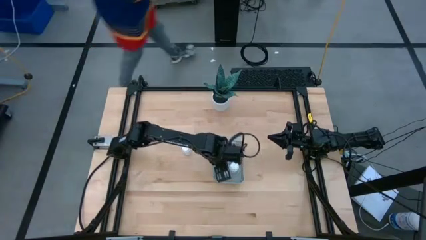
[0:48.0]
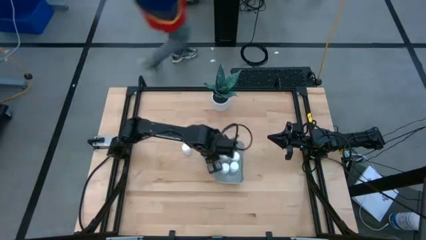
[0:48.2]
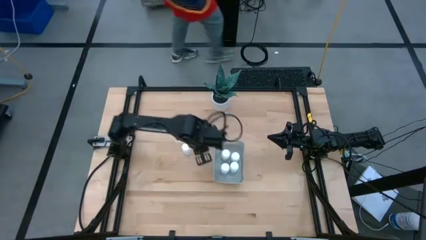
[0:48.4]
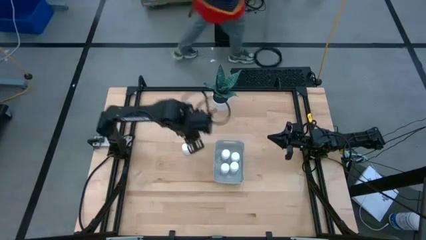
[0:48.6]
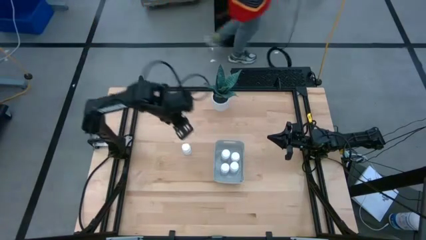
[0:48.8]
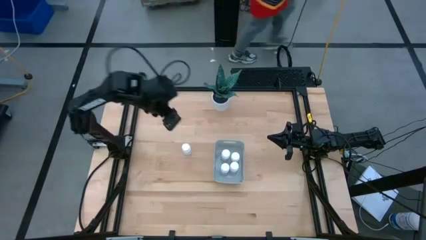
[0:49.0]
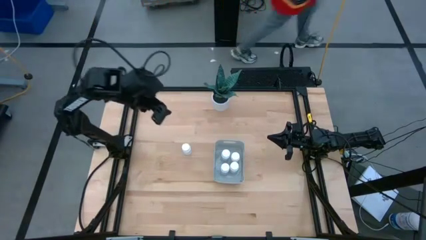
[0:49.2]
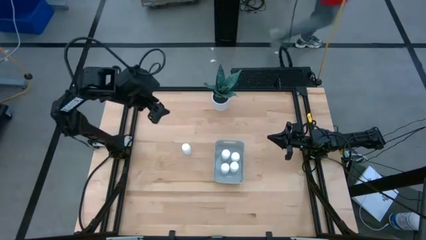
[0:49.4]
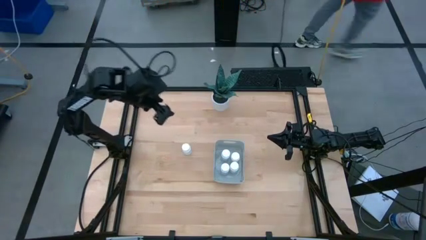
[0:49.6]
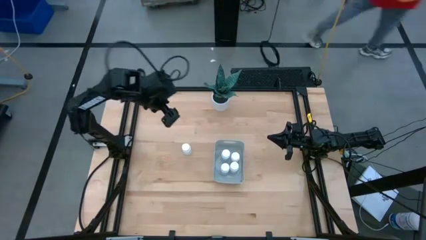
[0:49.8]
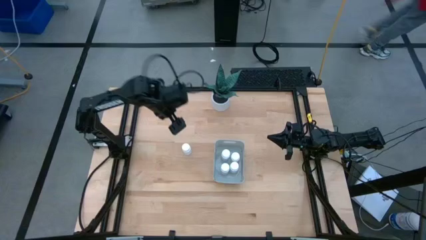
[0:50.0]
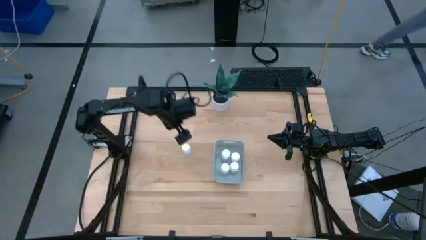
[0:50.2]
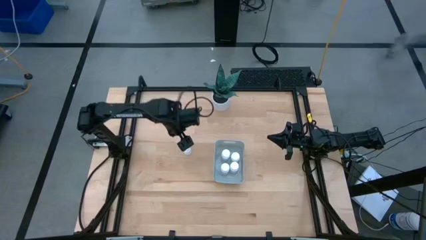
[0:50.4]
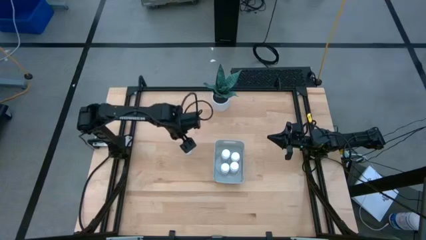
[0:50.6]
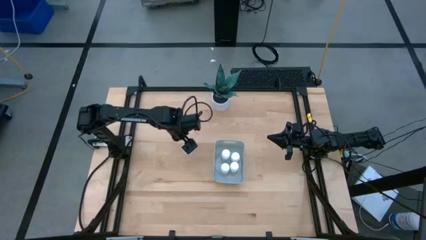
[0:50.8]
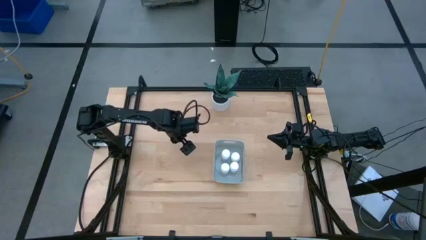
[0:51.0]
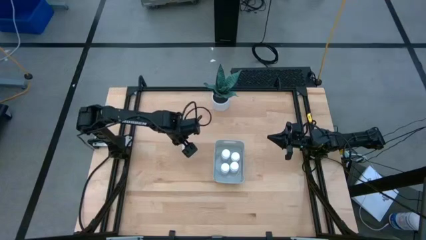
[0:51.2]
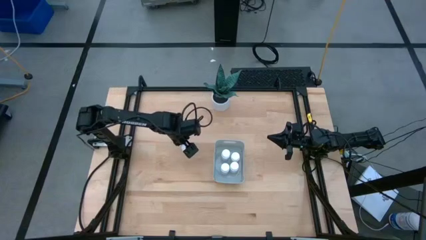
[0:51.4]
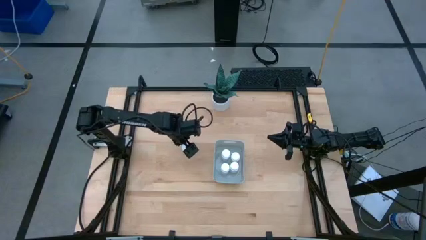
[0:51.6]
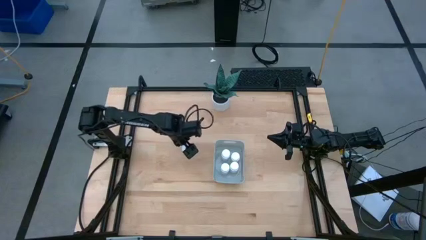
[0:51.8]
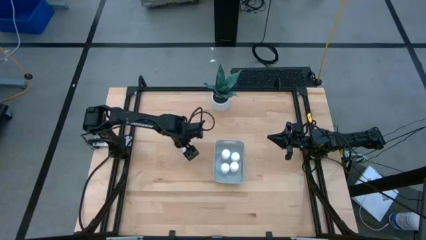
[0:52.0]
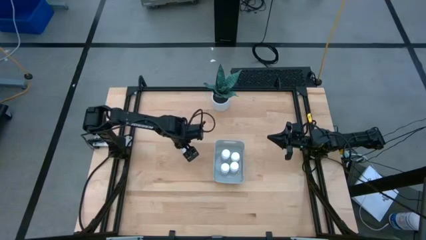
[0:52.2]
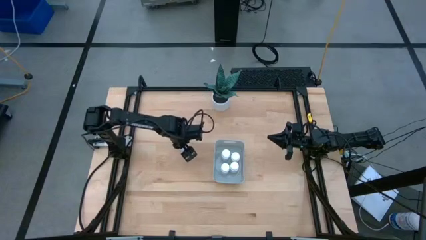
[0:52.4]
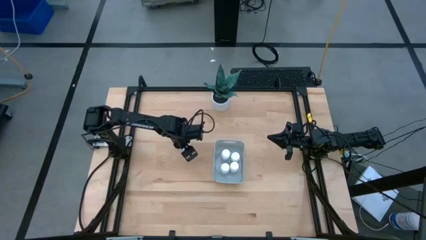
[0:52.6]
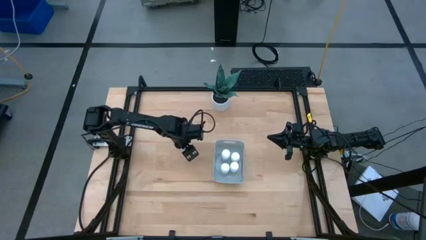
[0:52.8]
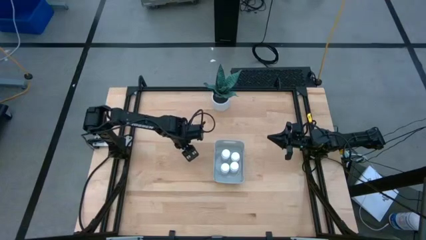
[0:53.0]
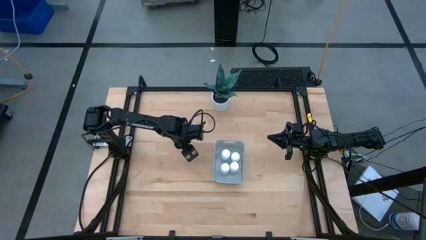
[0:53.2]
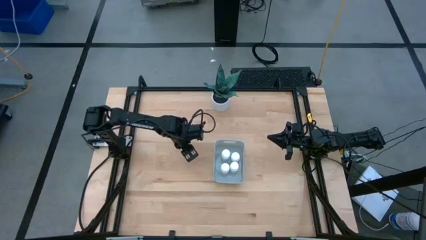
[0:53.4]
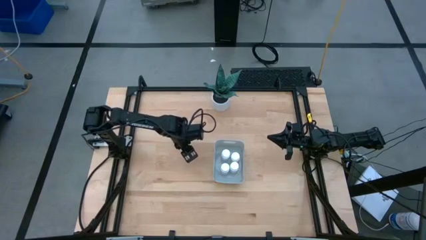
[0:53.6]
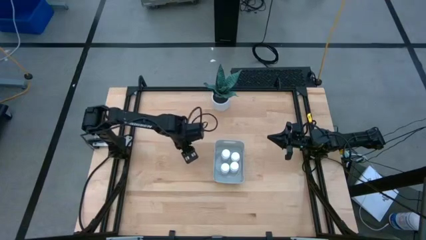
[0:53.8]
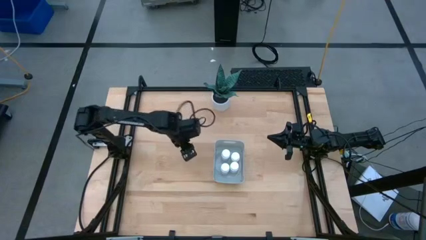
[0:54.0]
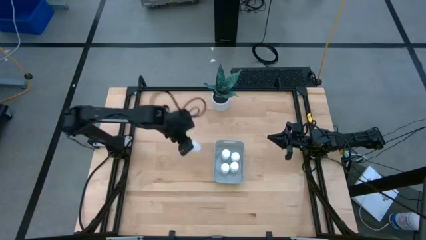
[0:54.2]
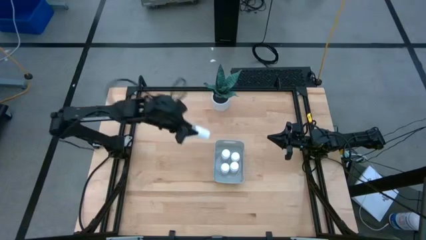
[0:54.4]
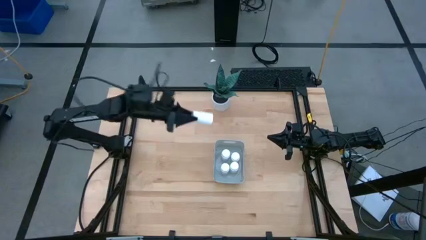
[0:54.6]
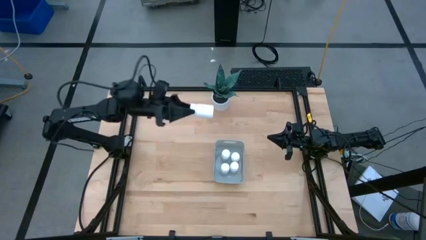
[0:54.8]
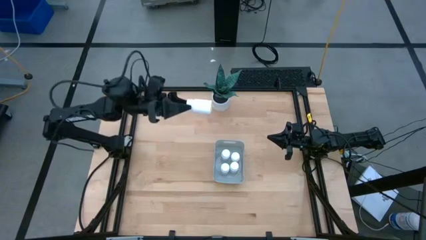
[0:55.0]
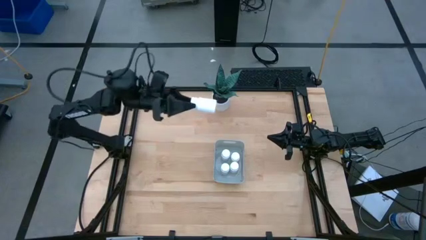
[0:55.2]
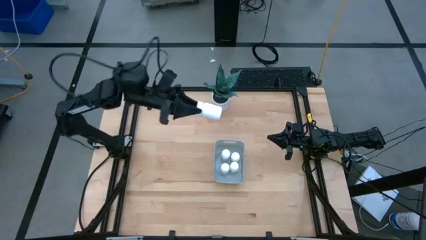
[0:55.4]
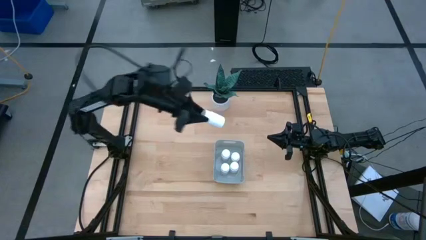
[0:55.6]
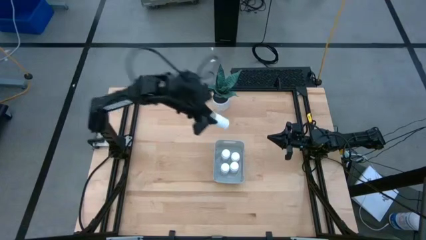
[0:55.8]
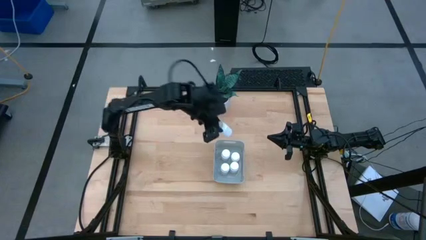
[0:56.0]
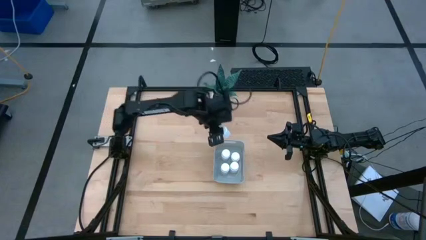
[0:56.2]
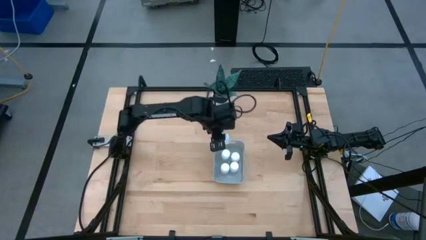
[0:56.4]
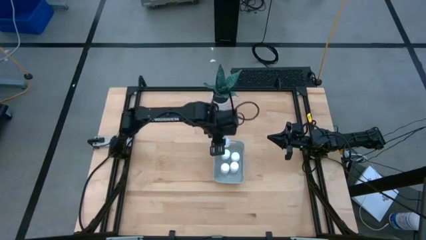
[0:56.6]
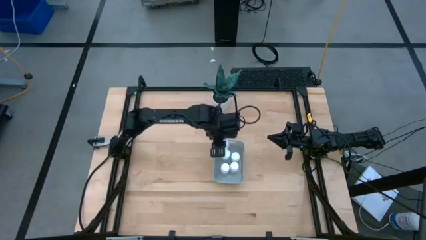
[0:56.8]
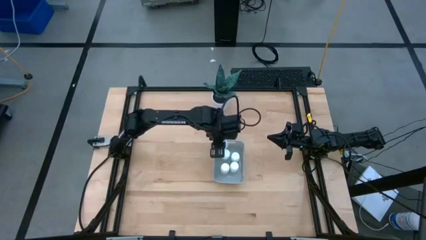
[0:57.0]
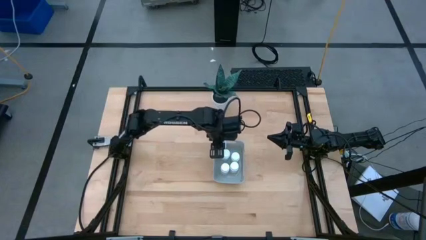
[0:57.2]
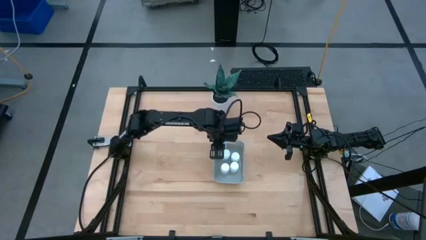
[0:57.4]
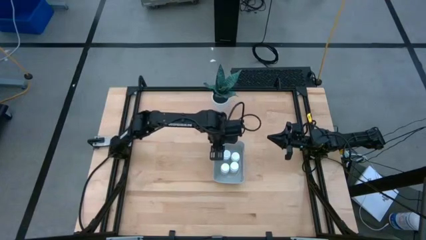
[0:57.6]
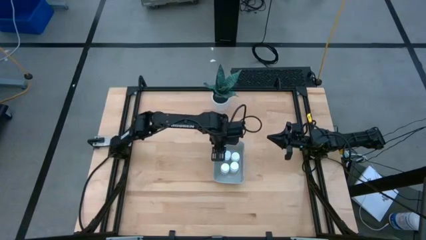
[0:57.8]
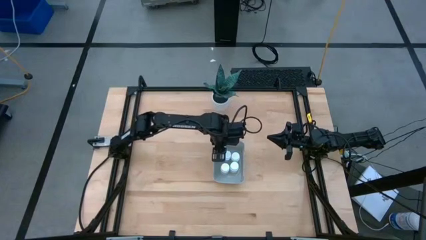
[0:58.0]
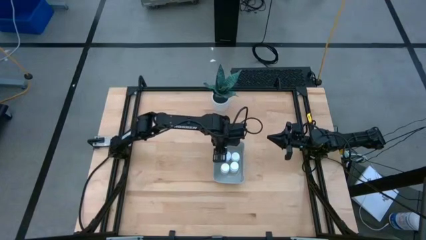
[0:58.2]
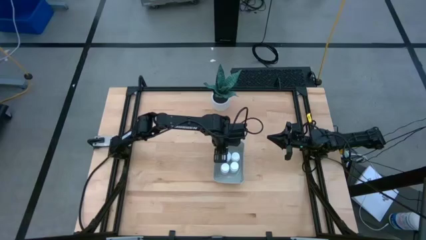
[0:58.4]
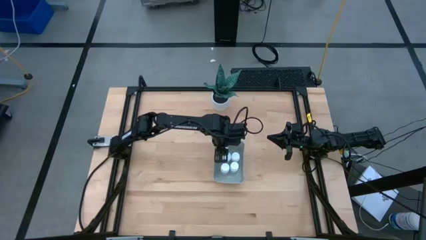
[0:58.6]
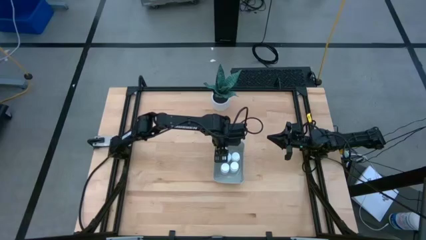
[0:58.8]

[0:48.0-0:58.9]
Task: Pick and place pill bottles into a basket
Put the white pill bottle into the gray bin

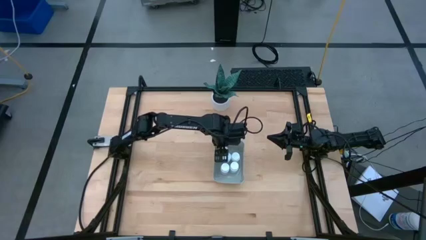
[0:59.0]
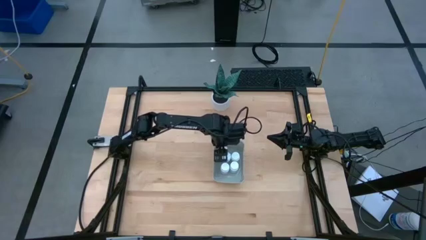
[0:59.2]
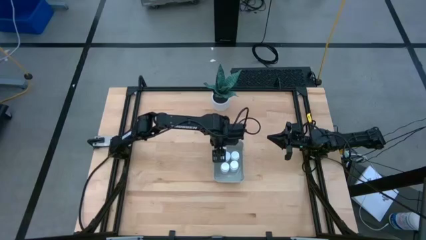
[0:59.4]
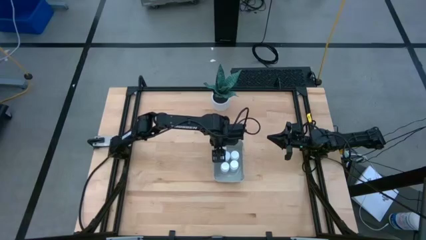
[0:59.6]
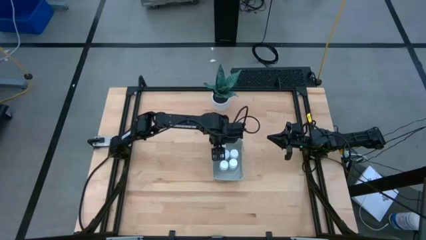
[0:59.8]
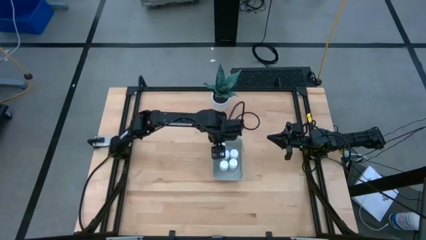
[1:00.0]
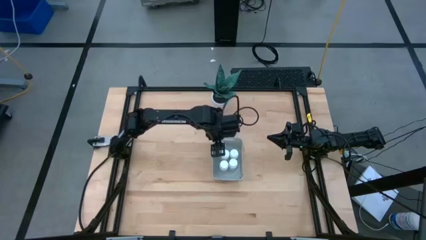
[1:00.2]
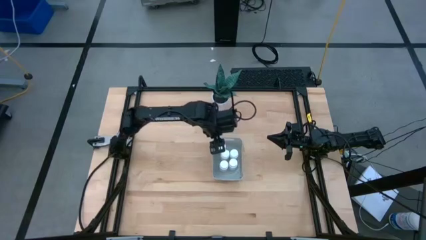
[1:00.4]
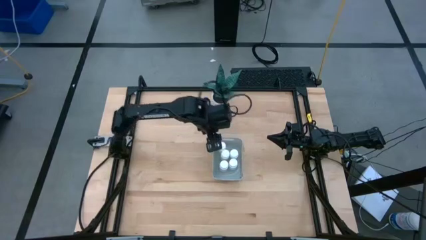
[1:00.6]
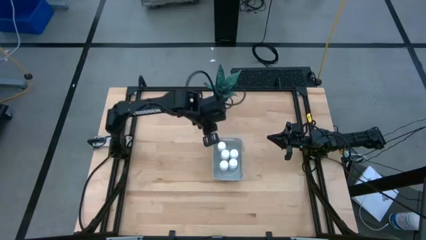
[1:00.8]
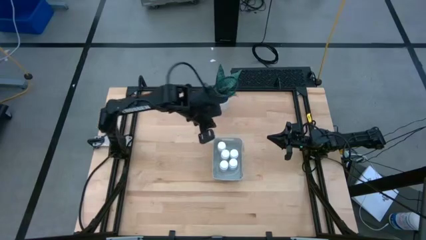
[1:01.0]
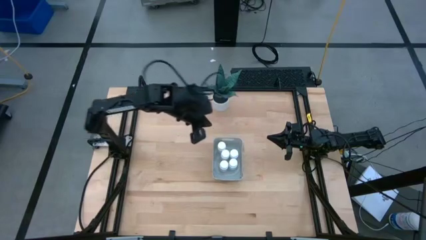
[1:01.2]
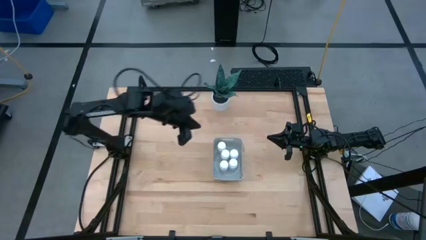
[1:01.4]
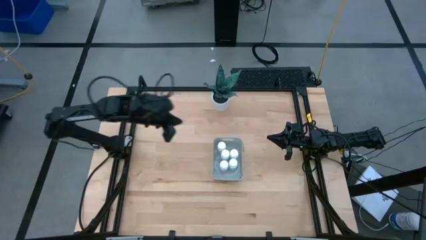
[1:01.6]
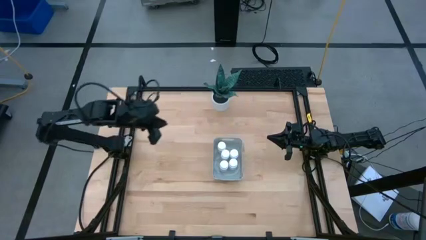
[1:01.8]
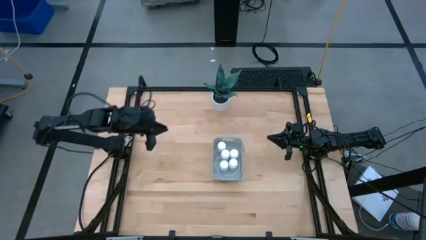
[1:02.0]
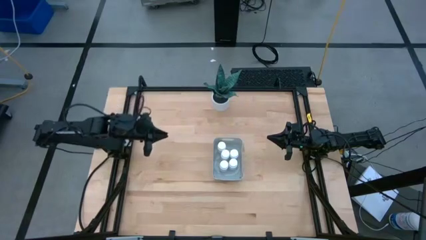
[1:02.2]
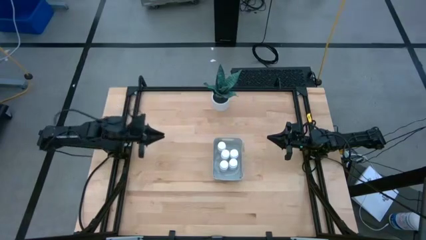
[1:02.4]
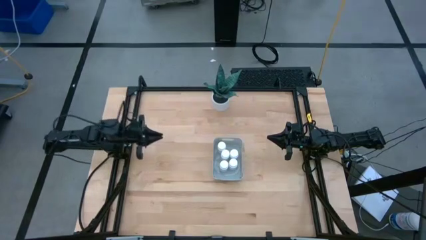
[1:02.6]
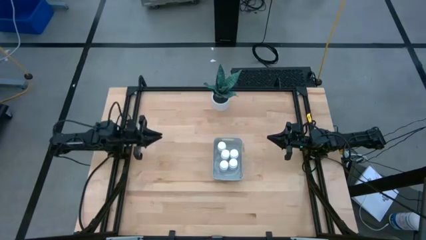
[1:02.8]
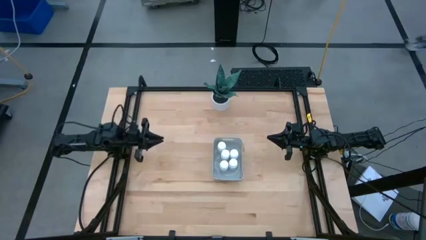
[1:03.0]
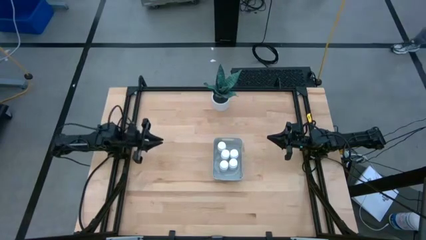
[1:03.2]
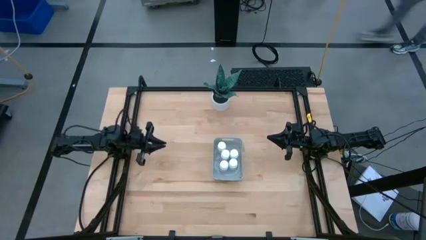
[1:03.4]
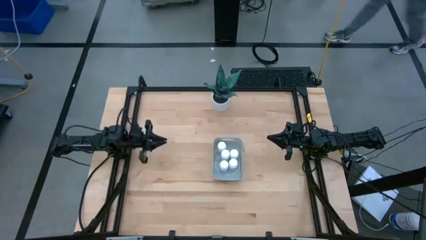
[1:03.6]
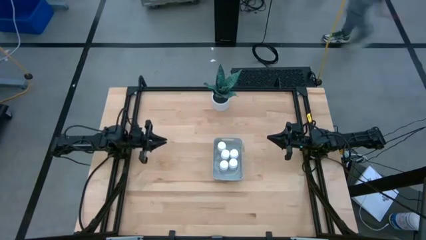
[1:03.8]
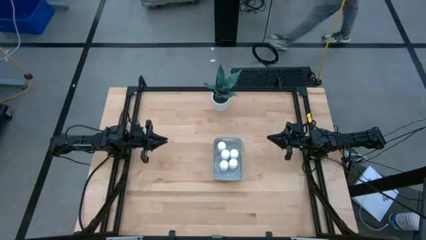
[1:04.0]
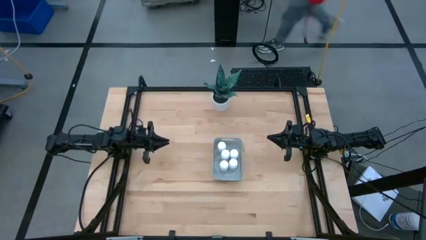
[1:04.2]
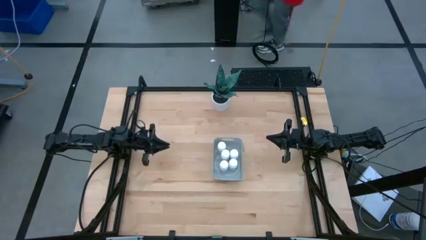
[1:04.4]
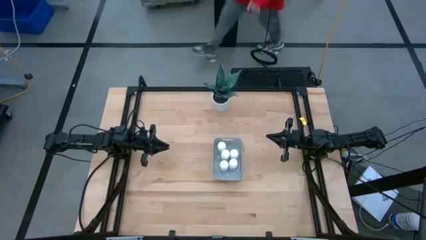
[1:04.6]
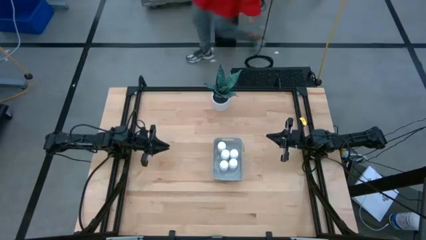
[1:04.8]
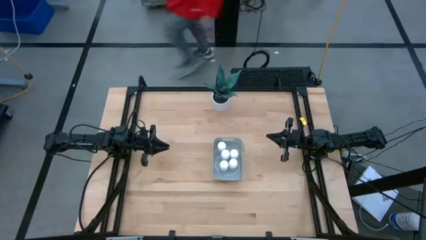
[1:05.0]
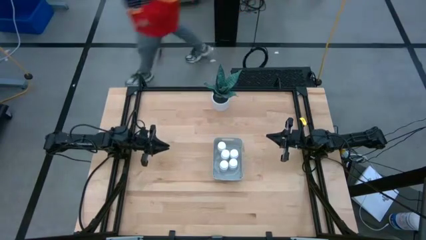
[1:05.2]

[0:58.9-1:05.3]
Return to Home Position
